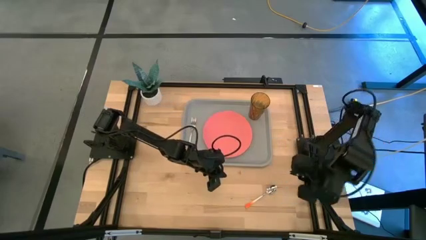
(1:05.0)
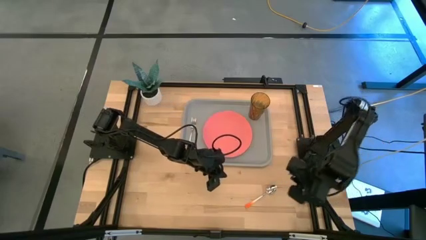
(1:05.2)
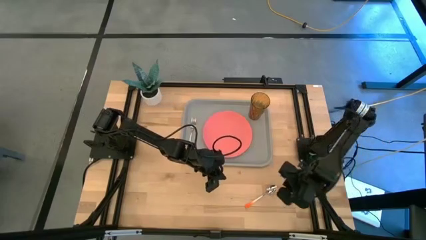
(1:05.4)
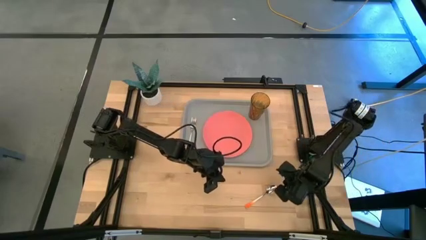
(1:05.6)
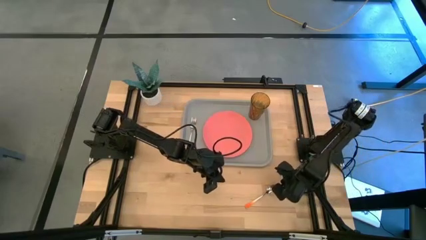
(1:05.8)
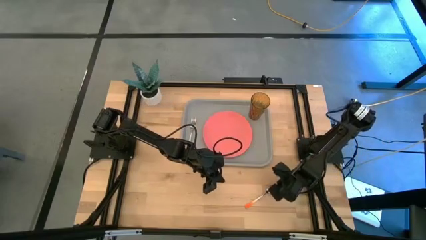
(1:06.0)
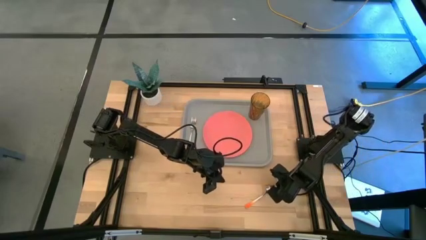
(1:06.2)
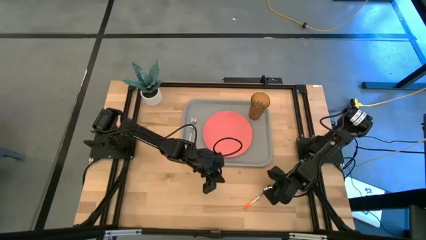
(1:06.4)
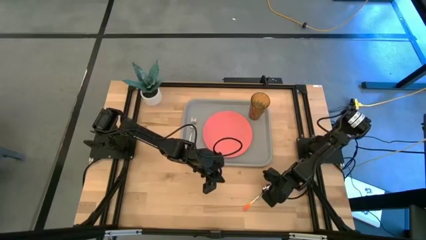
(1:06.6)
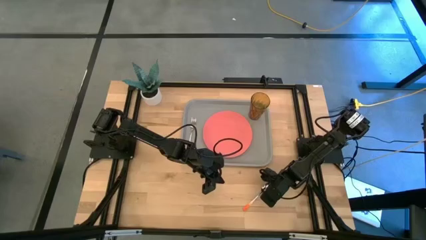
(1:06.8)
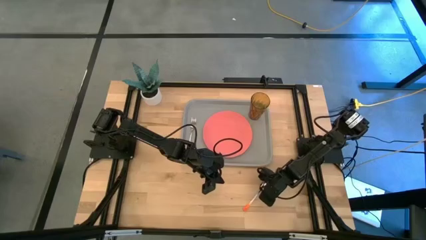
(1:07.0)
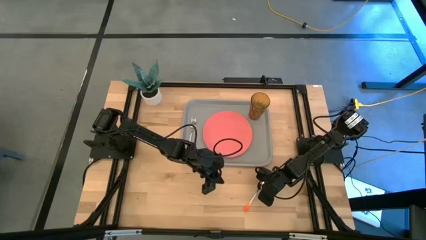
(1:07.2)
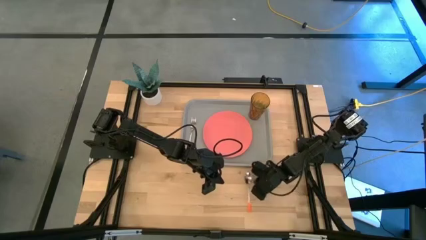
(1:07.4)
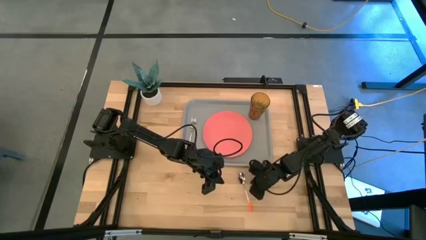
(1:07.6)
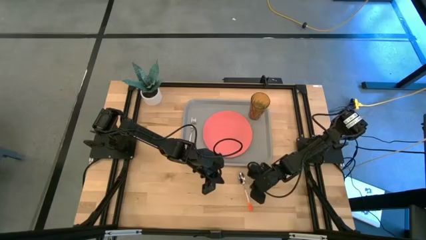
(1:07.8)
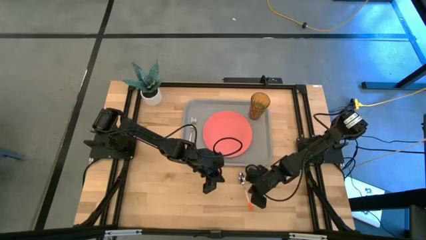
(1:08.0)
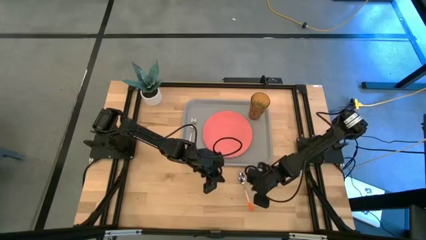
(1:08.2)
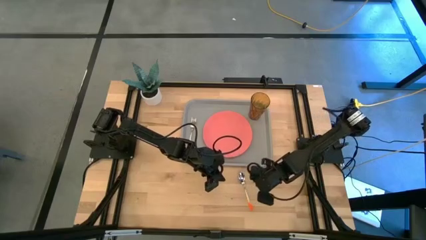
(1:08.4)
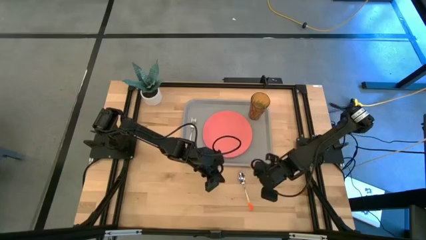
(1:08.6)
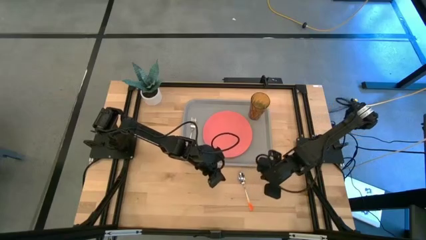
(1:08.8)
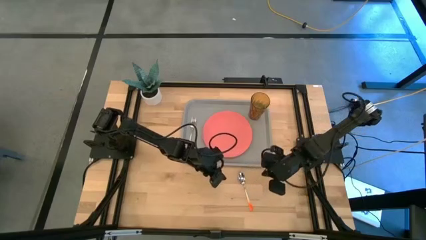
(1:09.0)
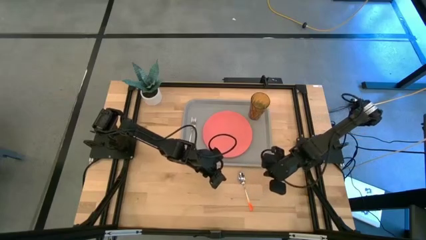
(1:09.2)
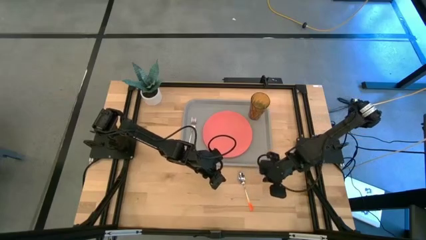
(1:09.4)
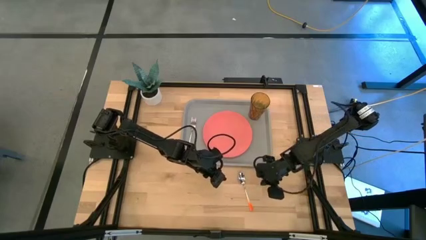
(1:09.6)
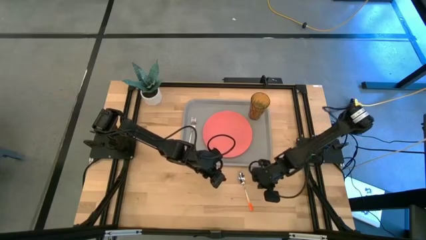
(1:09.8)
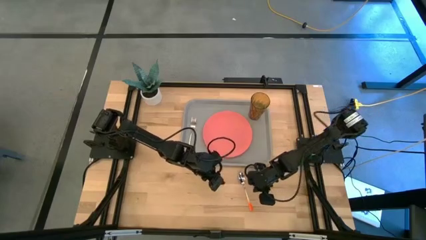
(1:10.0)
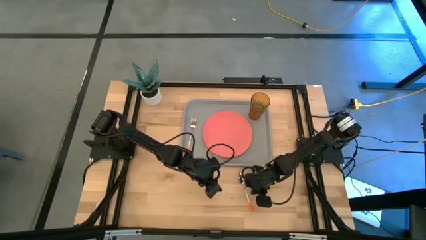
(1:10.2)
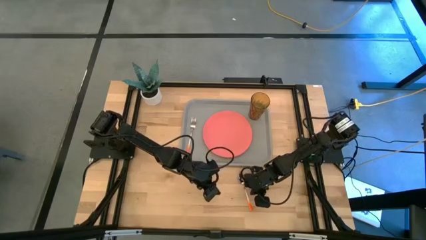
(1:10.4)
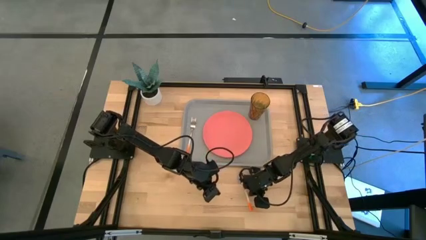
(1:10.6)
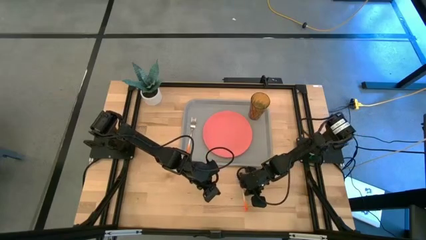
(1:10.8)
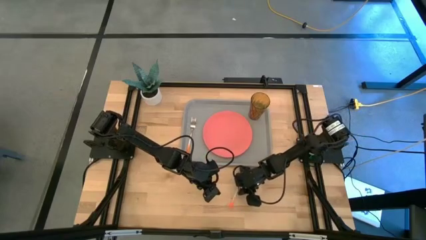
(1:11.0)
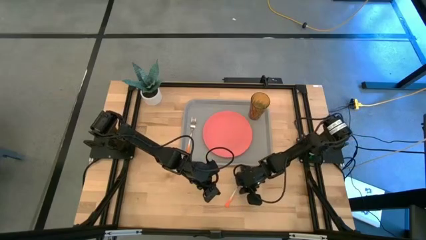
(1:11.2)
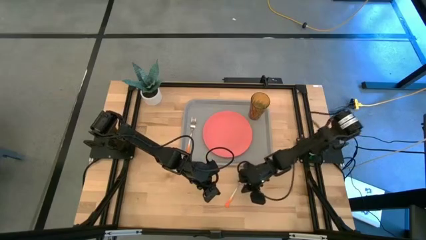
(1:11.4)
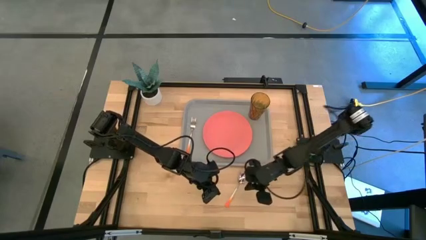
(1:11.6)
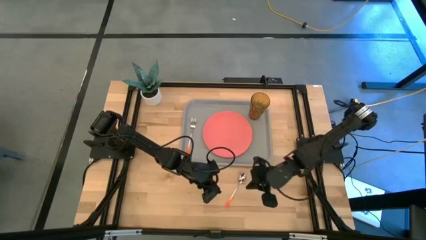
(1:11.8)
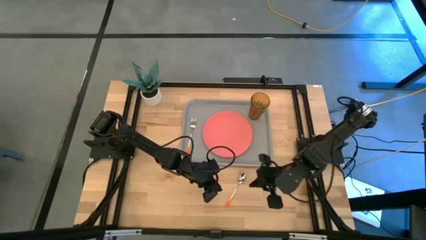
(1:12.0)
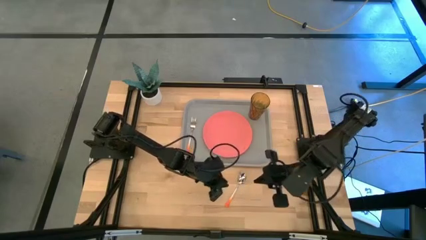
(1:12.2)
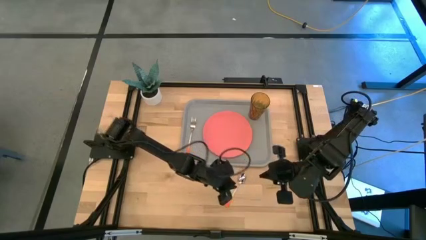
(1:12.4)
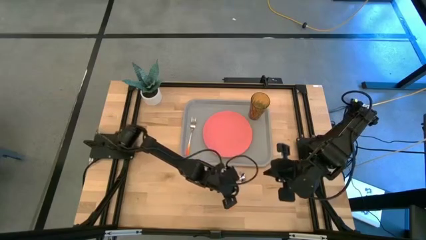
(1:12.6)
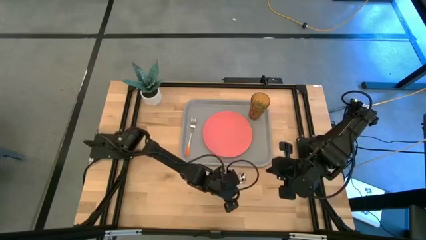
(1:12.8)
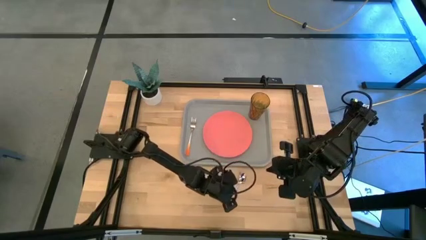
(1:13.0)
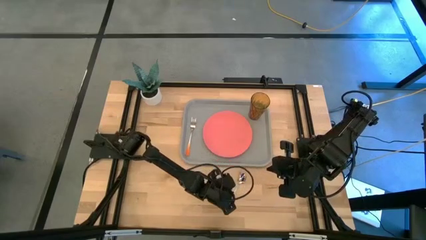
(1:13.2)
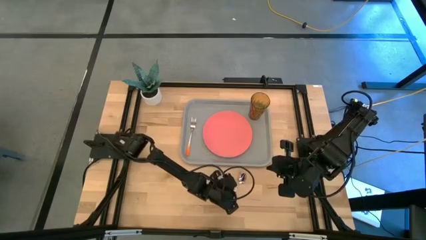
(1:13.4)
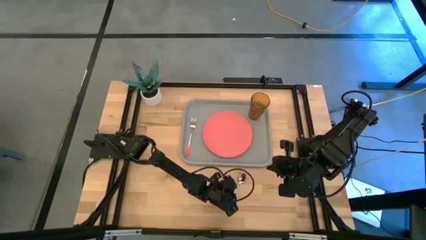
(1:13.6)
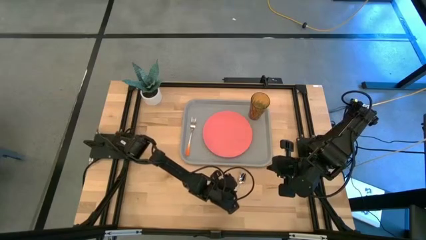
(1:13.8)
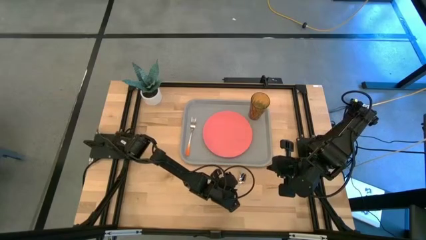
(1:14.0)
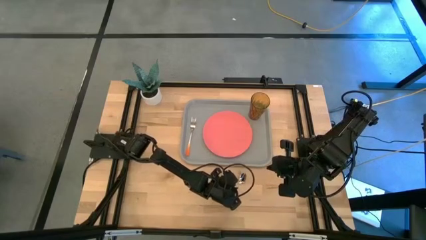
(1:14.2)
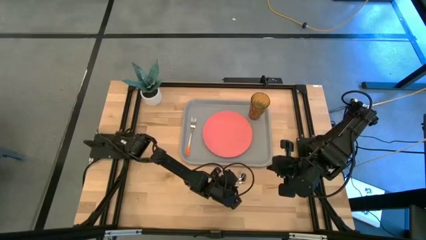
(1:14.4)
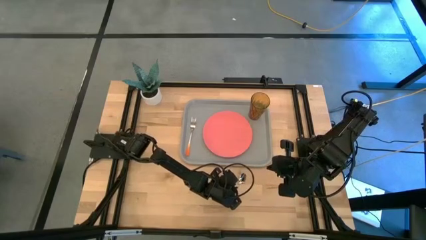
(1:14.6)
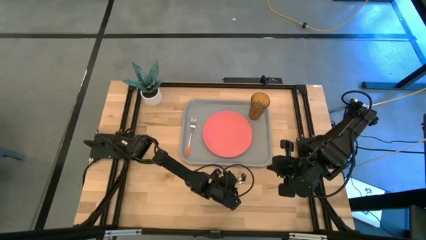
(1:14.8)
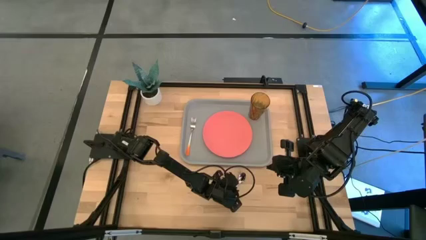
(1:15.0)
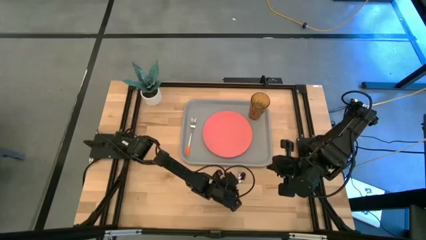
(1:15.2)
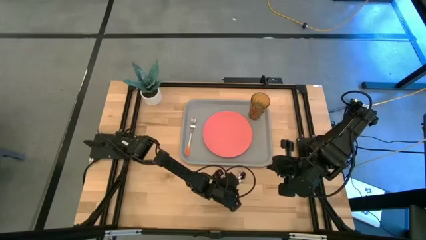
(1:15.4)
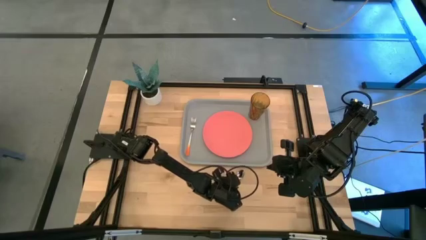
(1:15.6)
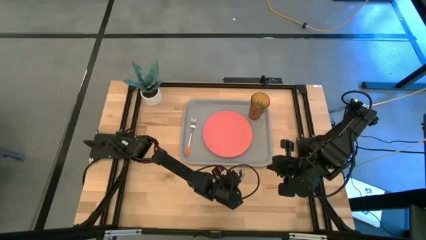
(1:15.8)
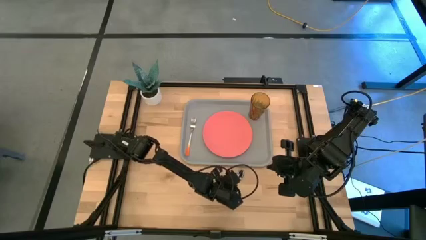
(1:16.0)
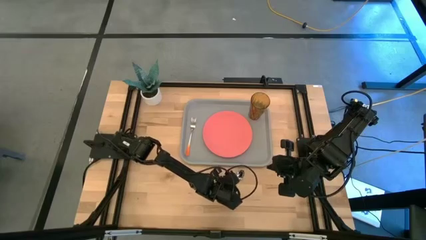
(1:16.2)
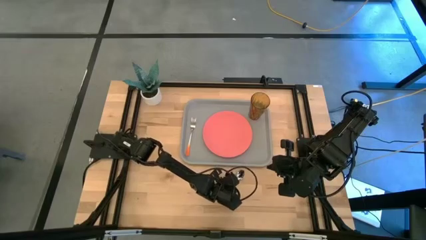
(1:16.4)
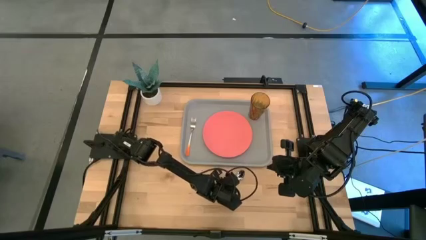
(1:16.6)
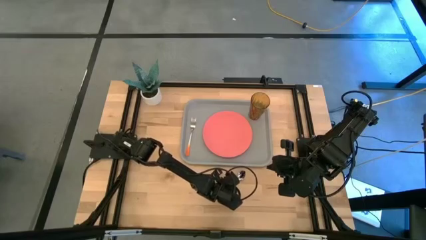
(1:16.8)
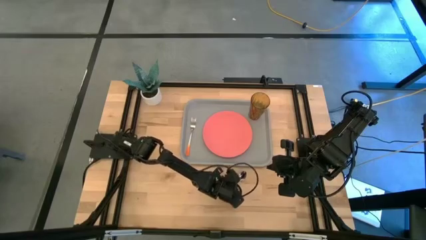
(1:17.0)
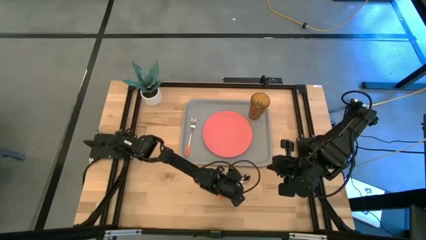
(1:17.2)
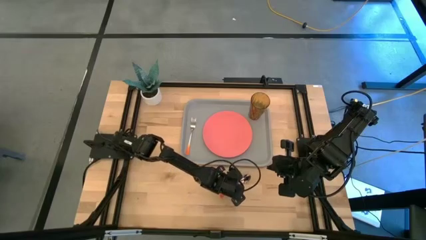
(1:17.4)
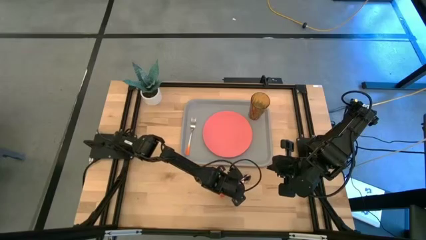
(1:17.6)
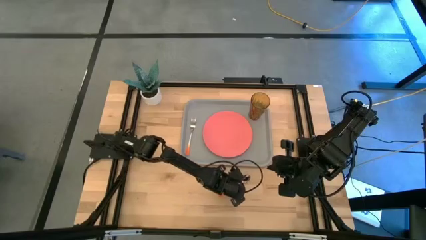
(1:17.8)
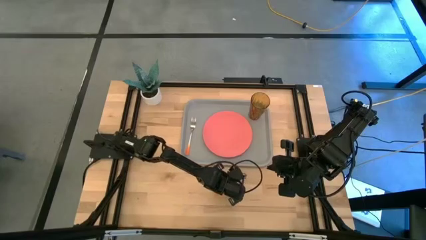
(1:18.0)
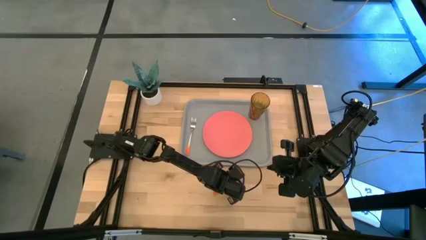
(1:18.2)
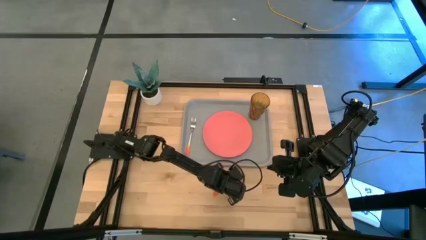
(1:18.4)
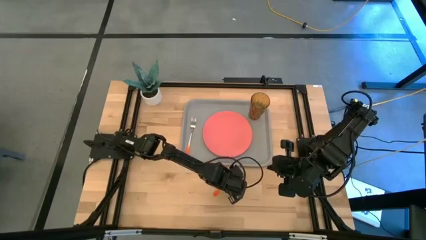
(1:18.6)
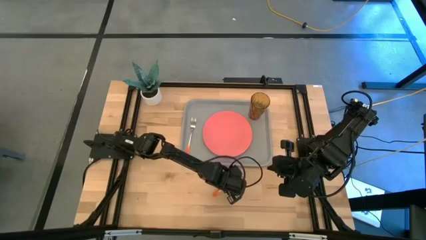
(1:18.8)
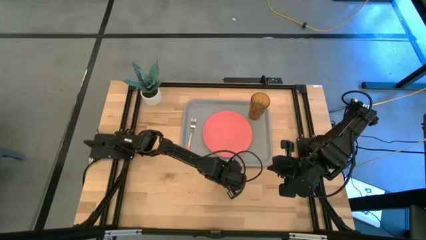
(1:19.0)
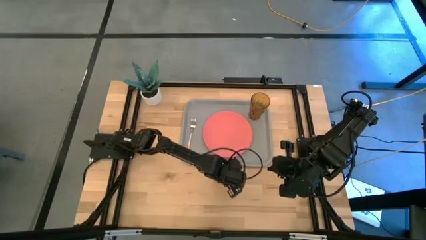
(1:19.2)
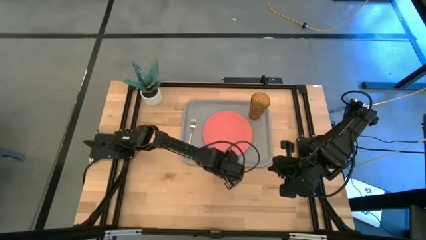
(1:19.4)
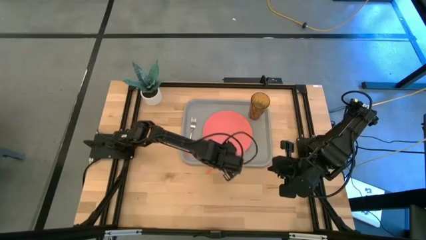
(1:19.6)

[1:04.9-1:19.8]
Task: Pick and place plate/cup/fork/spoon on tray
Put the orange spoon on the right side of the orange fork on the gray serving tray

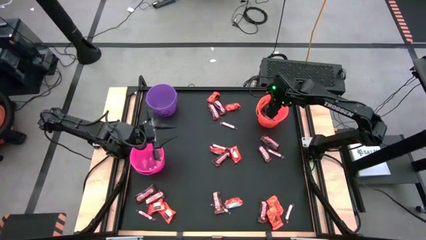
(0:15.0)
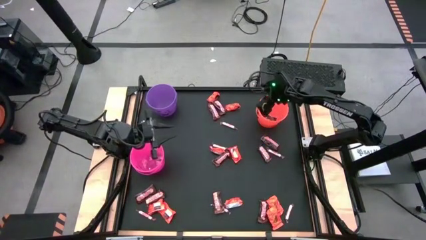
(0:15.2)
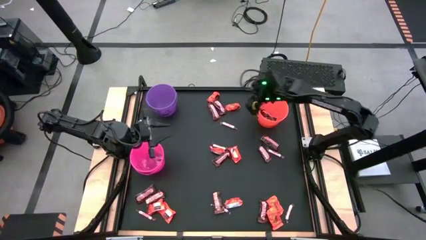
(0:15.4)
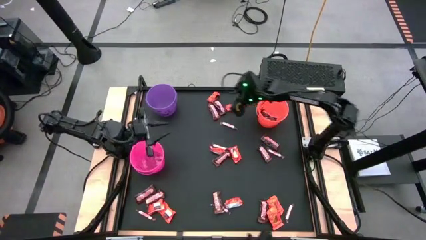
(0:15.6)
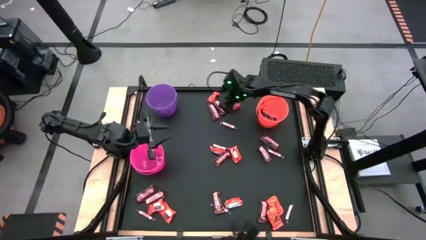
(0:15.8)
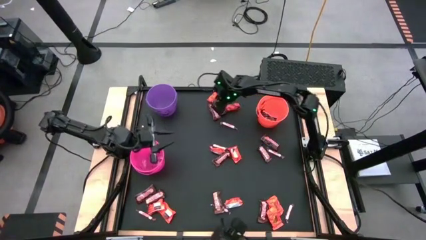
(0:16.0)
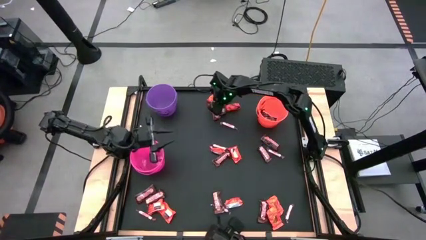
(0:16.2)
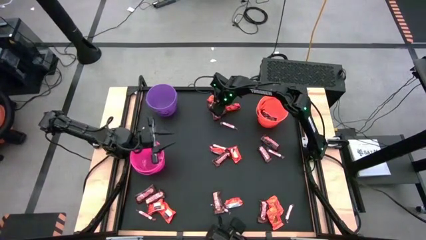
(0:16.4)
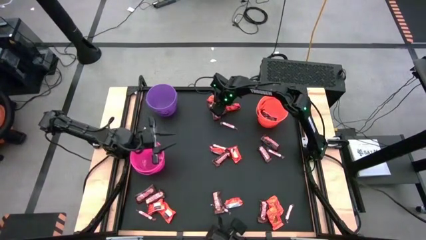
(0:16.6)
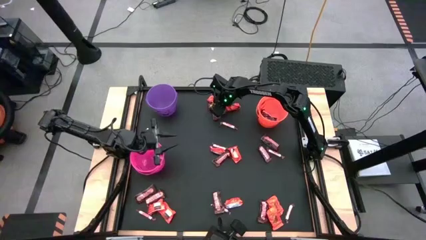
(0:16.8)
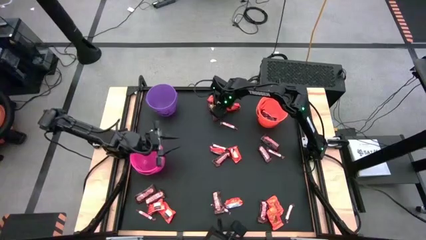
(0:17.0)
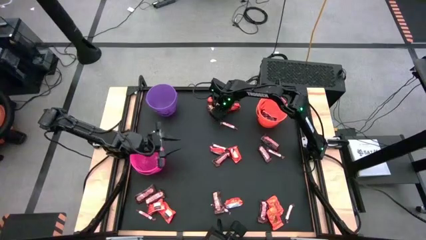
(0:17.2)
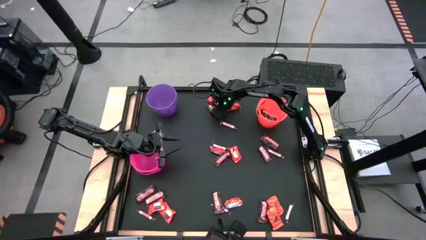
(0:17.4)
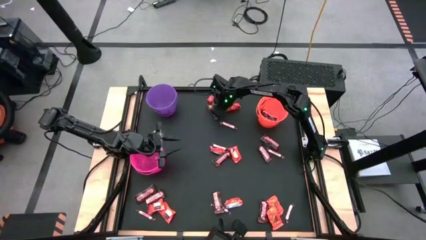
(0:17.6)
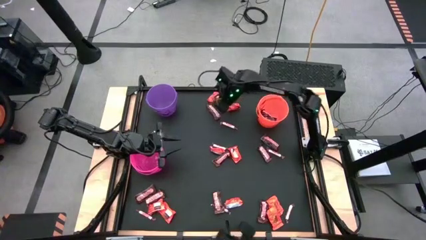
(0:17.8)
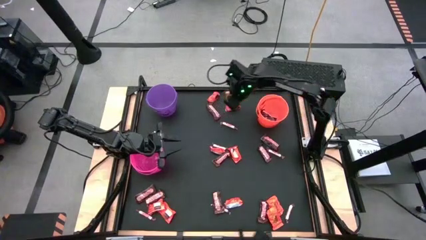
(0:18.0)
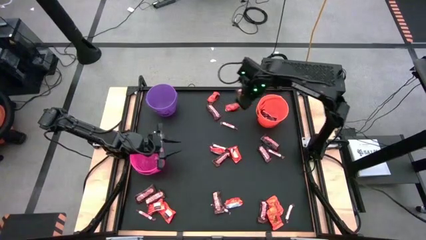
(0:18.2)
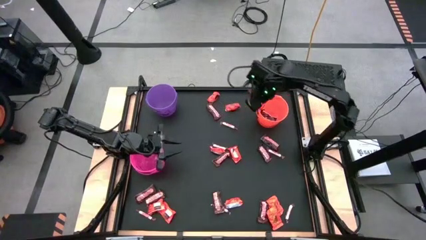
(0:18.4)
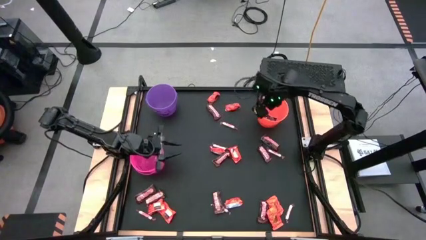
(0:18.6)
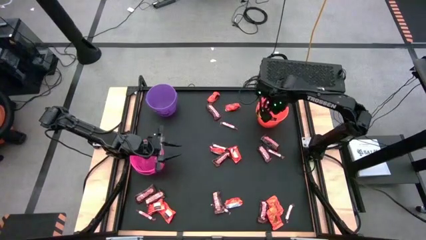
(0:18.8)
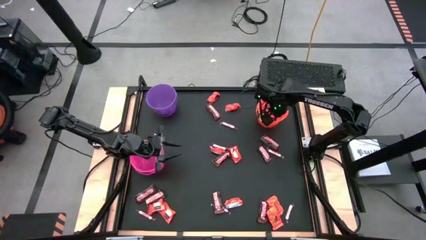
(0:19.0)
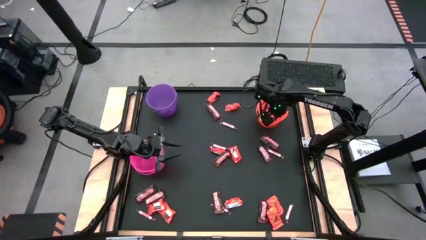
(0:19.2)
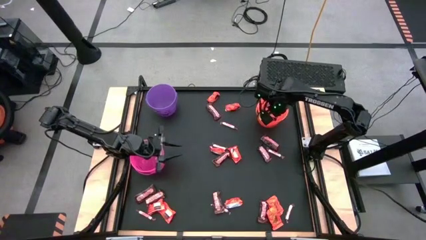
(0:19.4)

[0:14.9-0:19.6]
Task: Sort candy by brand, put in halloween buckets
Put the brown candy into the orange bucket
